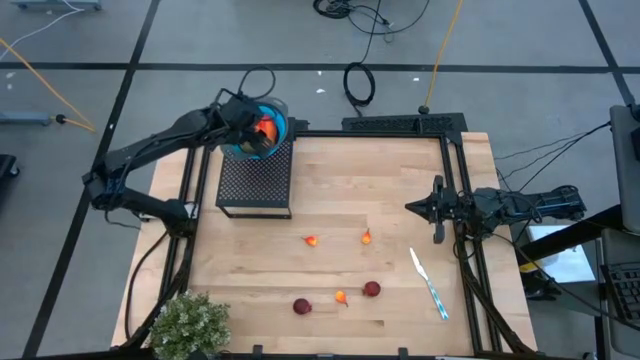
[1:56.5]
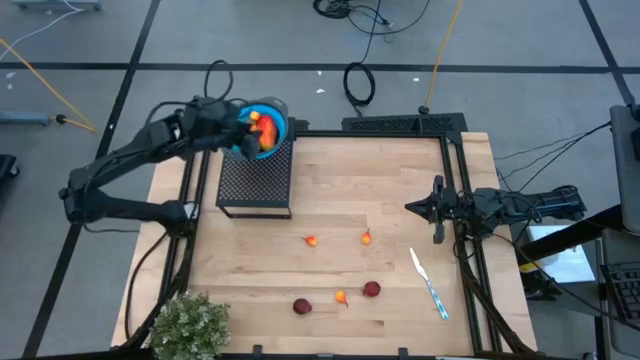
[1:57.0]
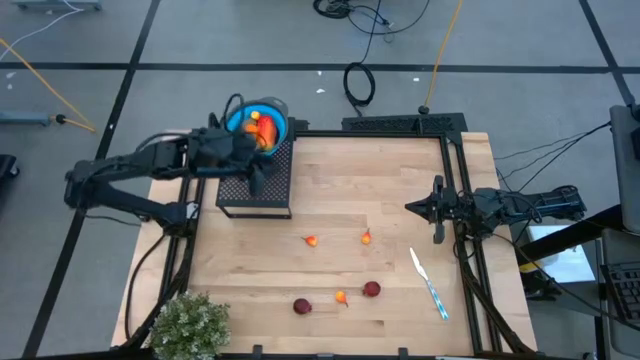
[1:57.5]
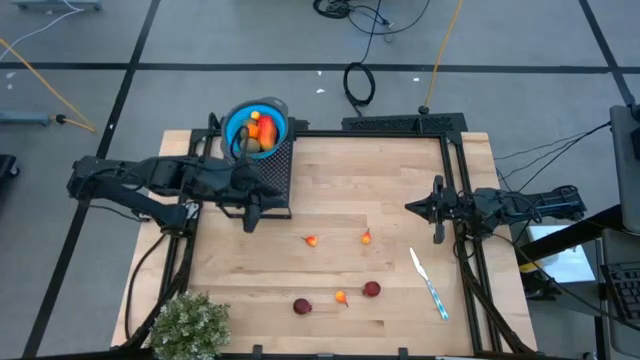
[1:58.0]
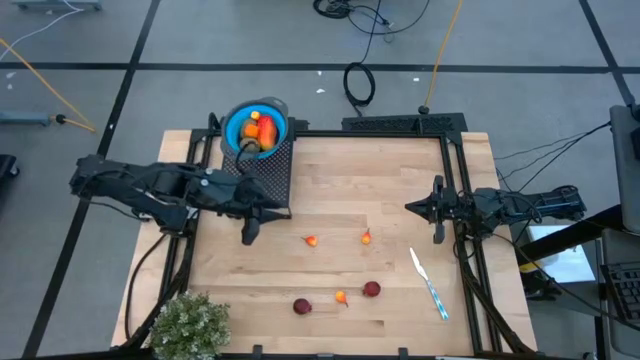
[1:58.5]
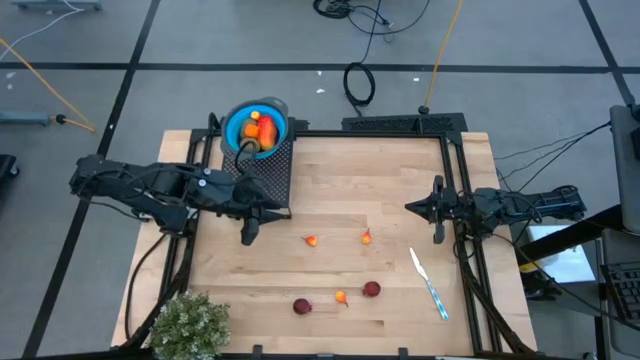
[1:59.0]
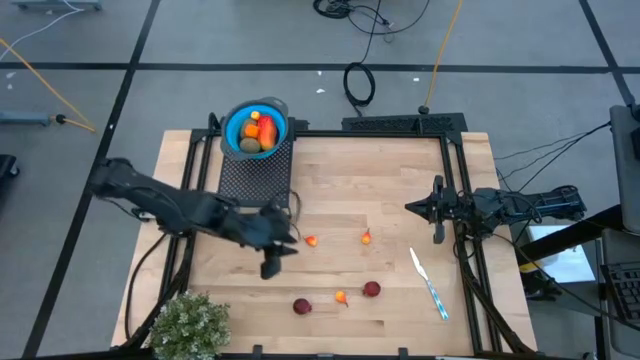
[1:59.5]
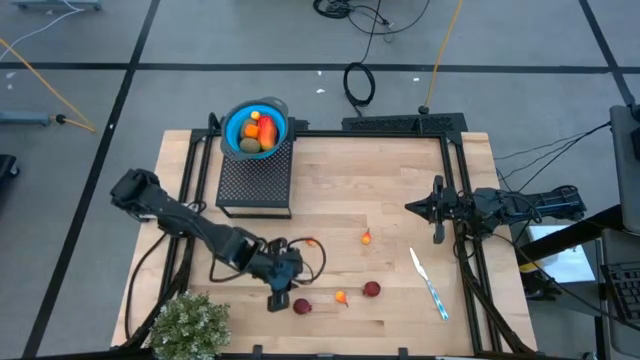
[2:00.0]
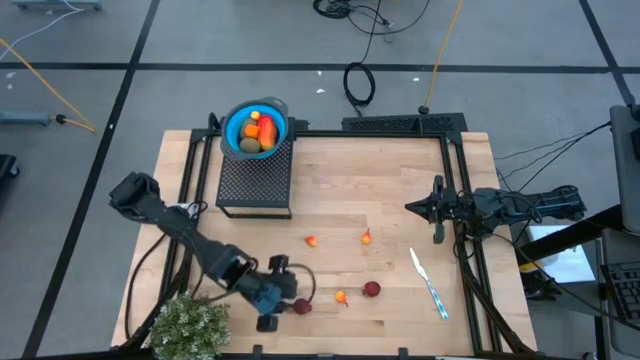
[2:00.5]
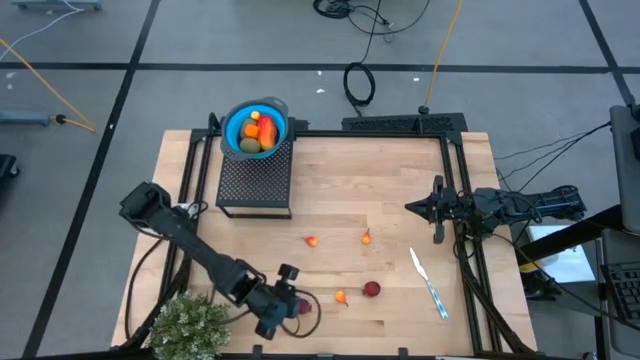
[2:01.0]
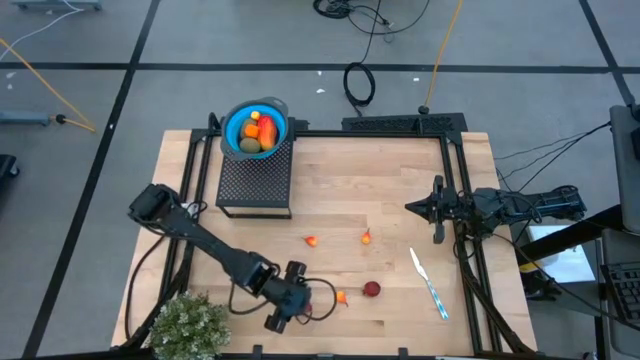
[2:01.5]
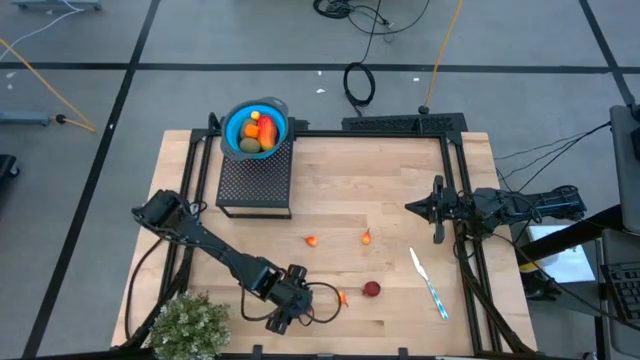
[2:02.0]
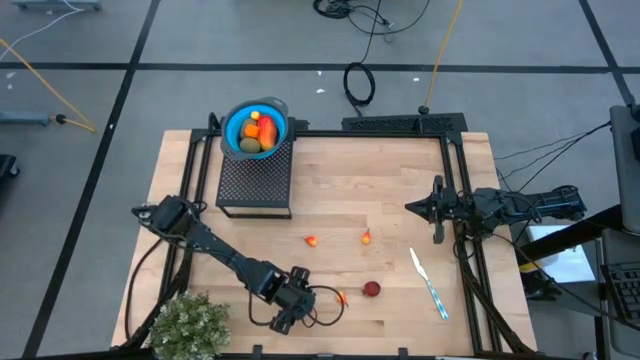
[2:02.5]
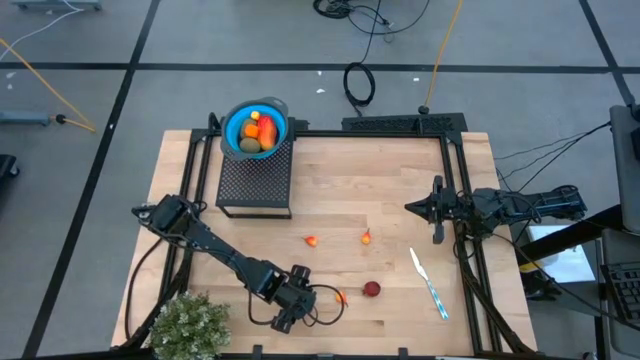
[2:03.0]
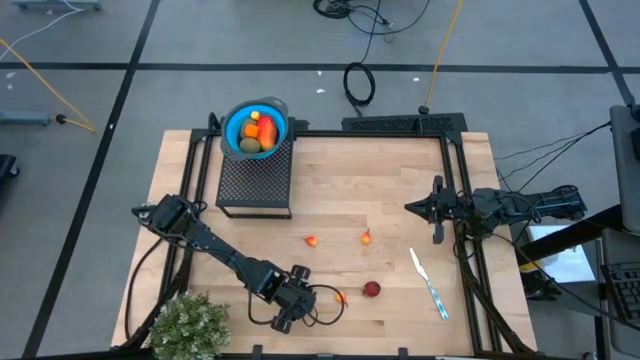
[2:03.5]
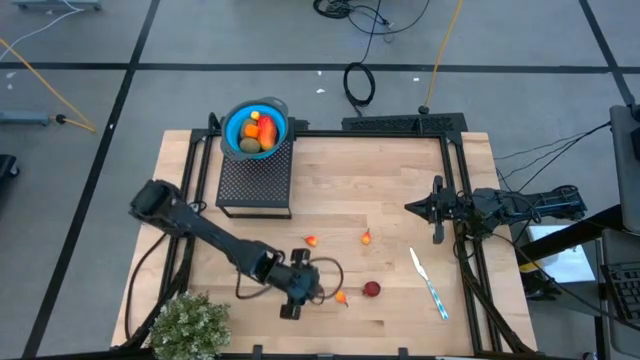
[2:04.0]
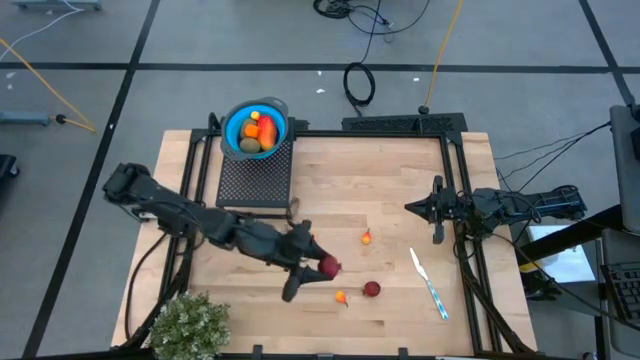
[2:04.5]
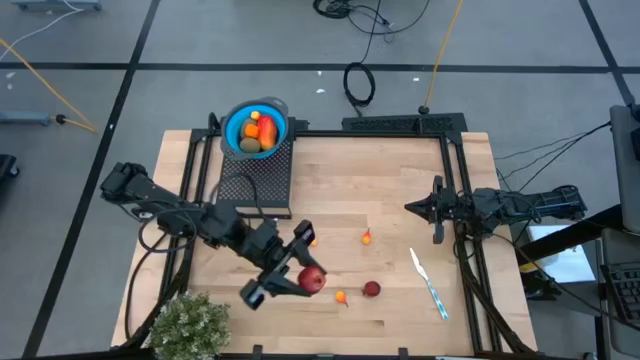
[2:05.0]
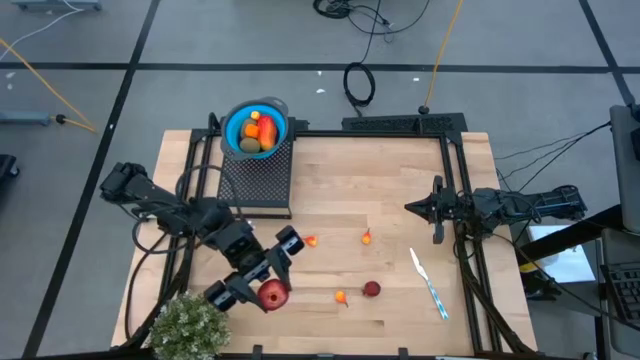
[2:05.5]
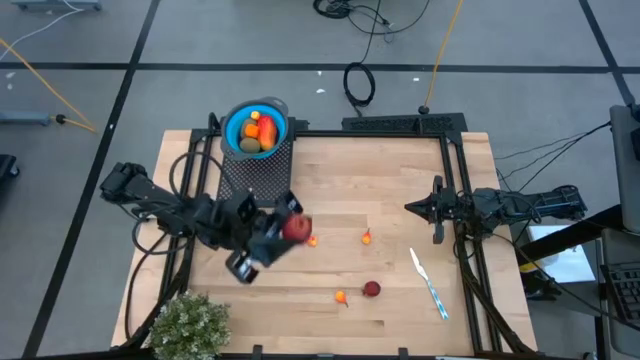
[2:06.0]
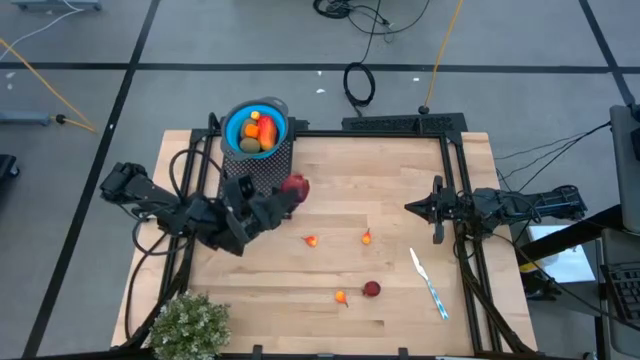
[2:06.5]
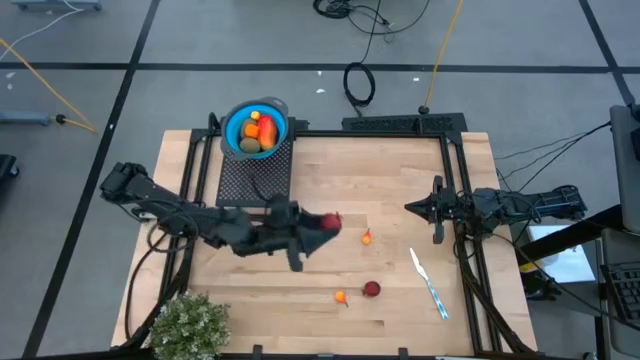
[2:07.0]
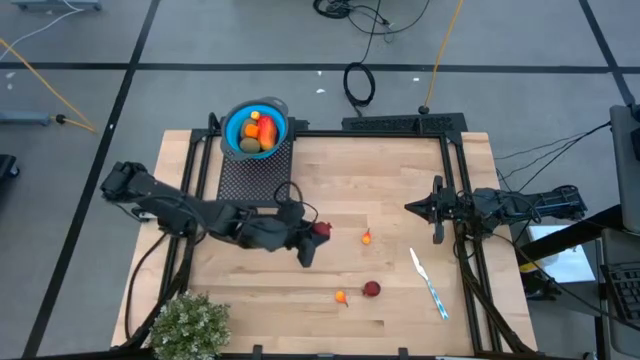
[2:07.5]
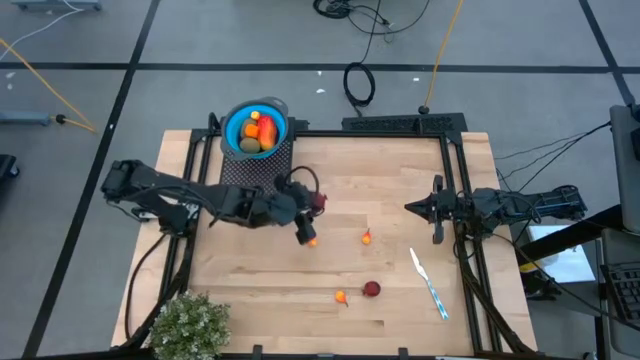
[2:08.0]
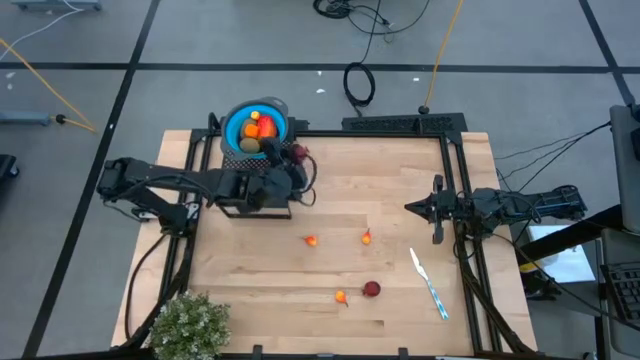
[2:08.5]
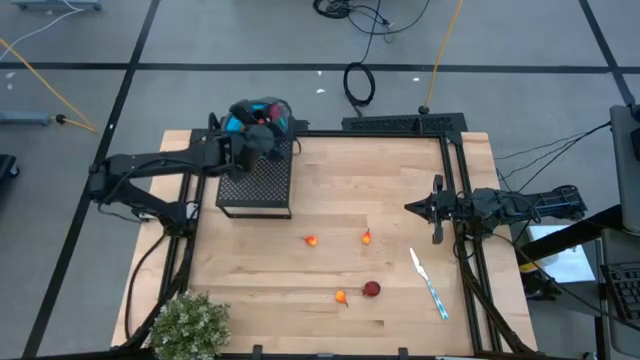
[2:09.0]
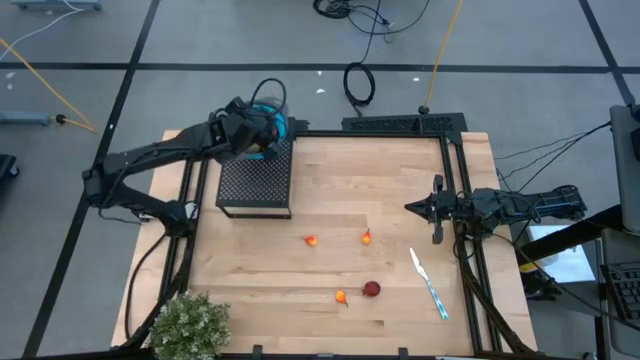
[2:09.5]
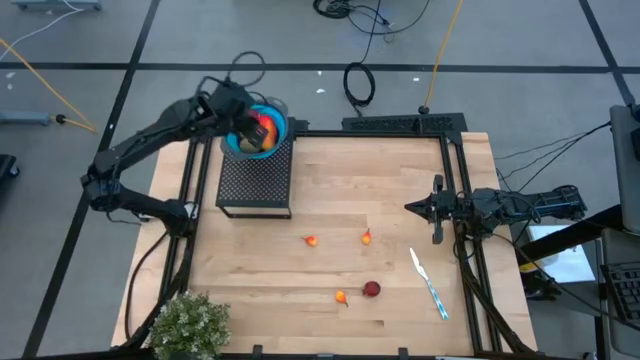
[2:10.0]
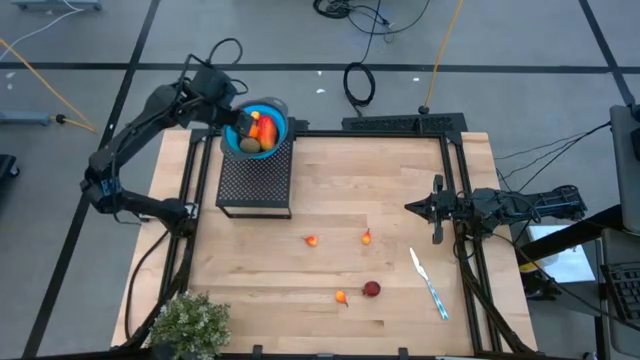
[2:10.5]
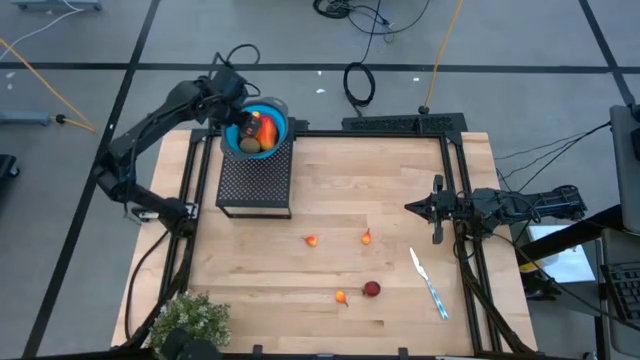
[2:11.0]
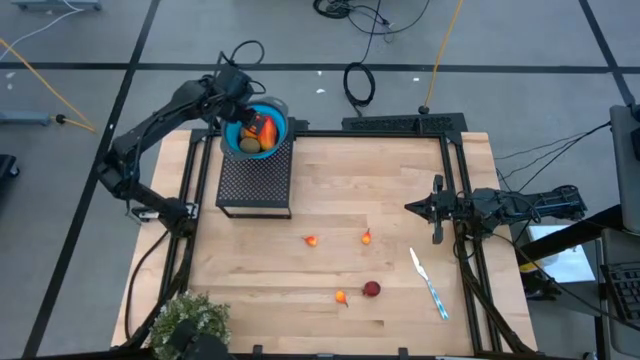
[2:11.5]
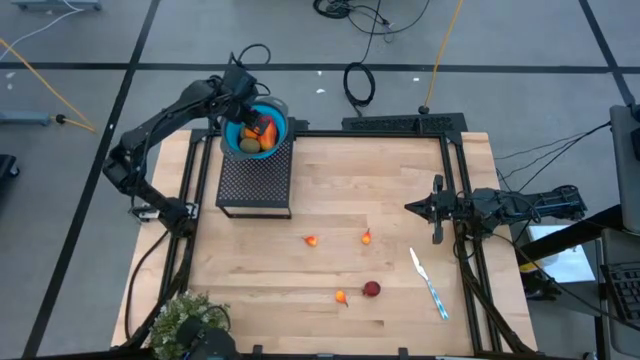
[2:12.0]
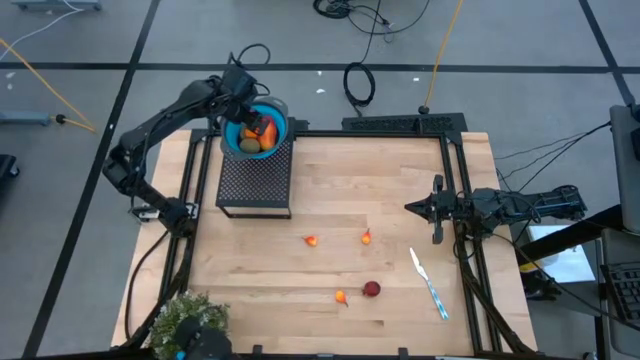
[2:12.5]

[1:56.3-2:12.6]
Task: Pick & Place Fruit
Put the left pomegranate into the blue strainer bowl on the shelf

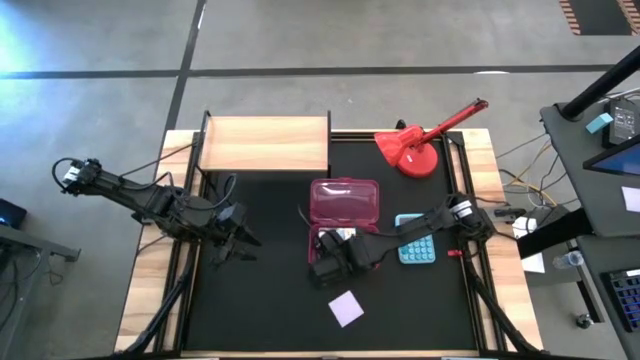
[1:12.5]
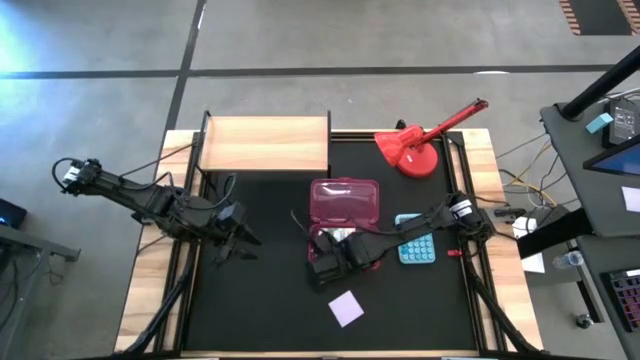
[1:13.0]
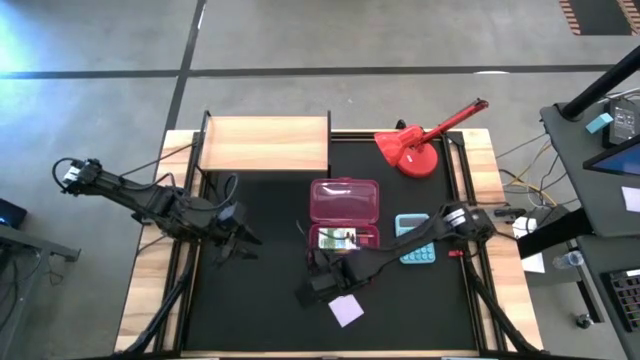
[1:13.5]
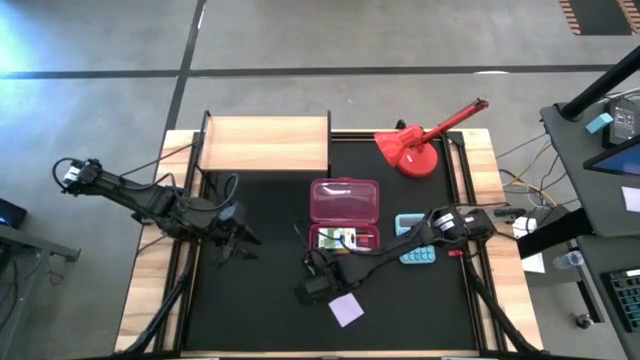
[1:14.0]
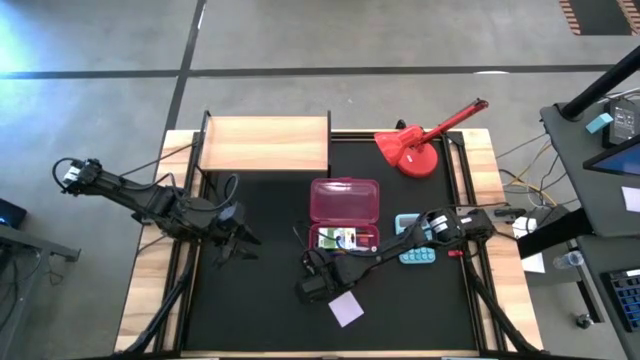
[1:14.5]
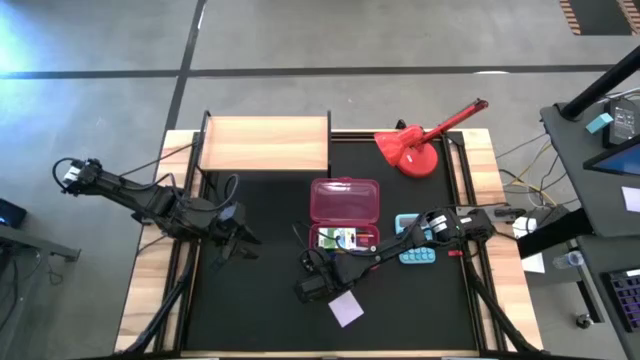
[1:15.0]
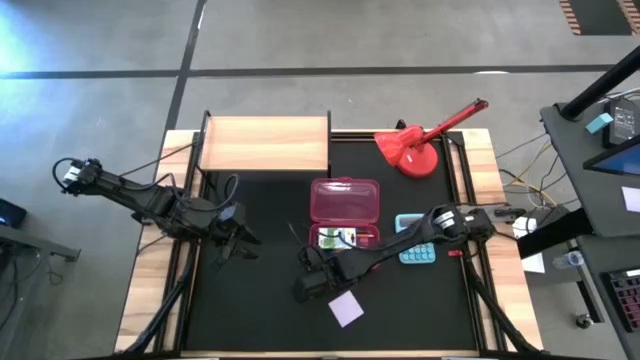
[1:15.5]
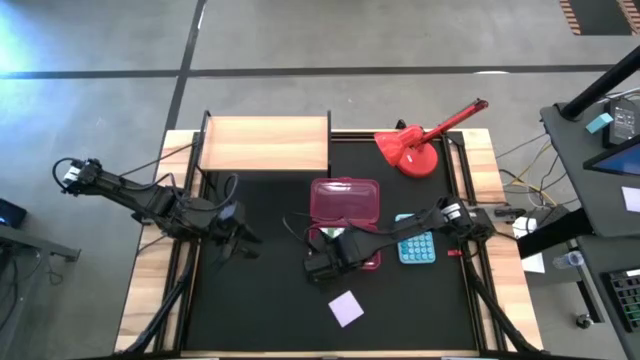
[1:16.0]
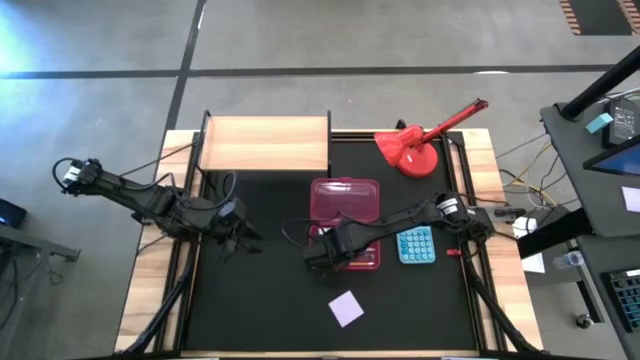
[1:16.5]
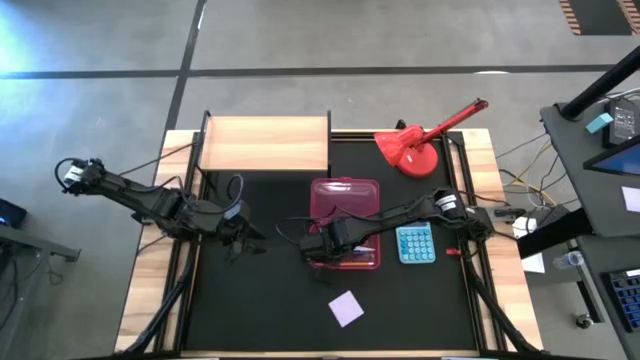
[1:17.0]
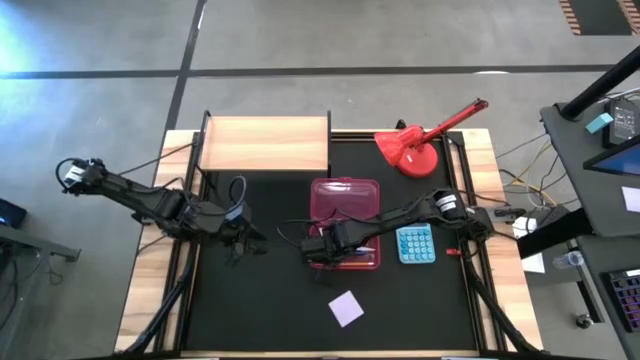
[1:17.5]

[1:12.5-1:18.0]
Task: Pack school essentials
Put the green eraser into the pink supply box
